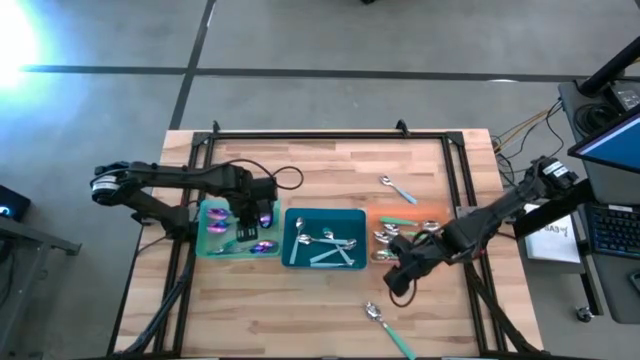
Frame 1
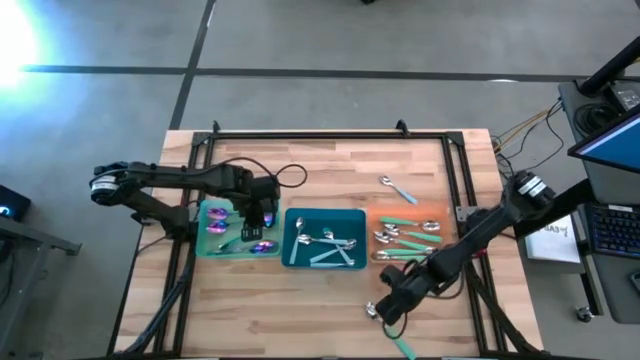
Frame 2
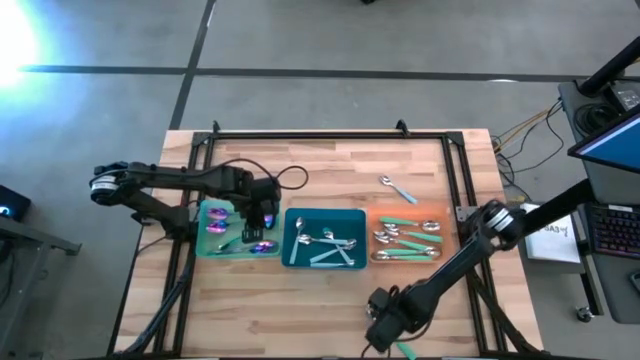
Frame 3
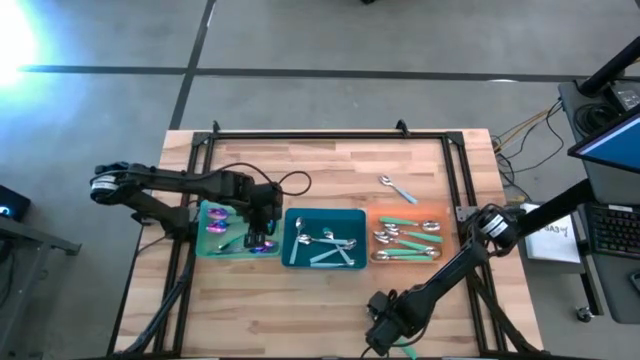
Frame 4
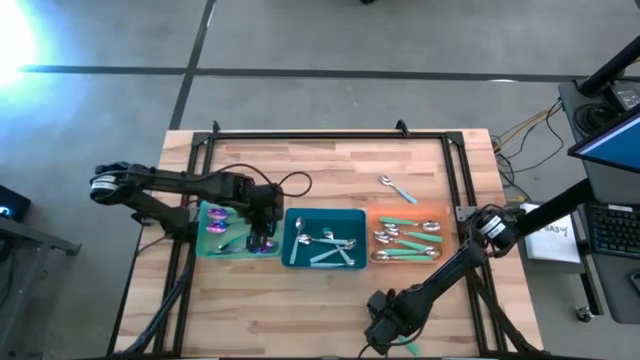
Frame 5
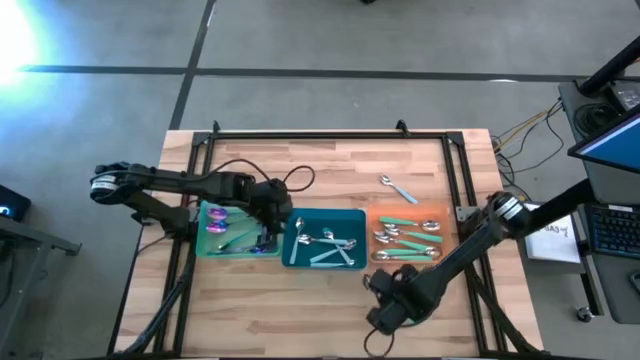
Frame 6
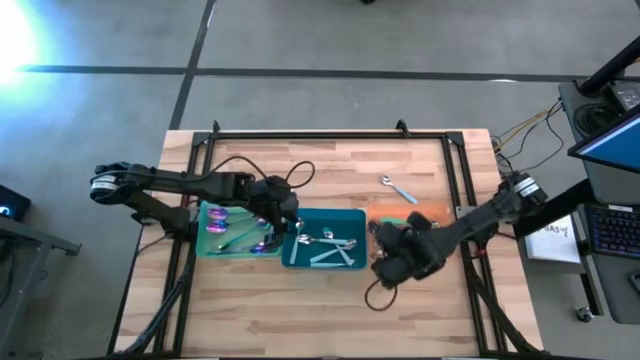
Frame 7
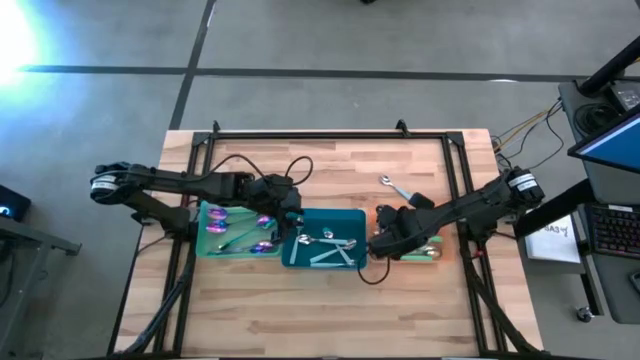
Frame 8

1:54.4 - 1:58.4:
Task: Sort silverware by color (type)
Put the green spoon into the orange bin

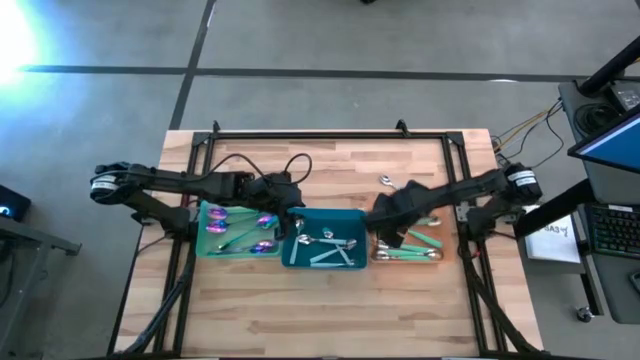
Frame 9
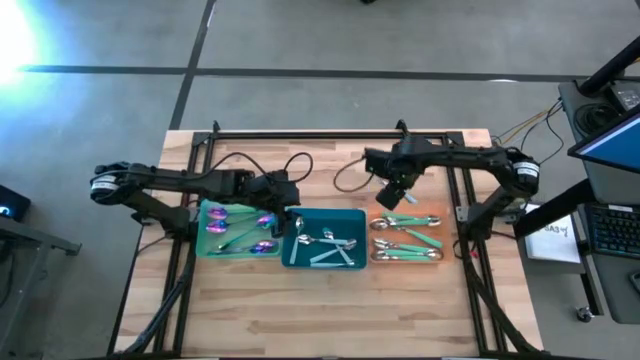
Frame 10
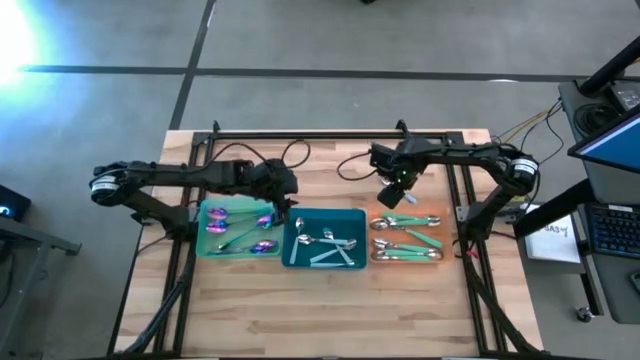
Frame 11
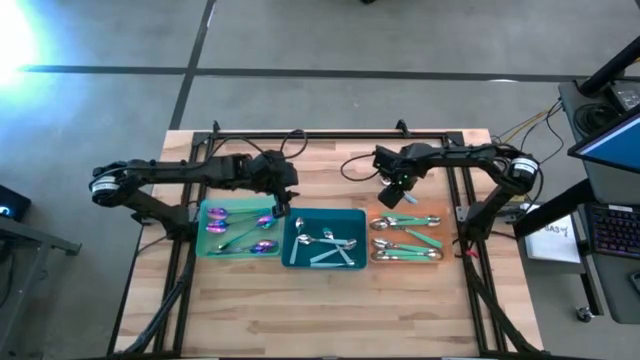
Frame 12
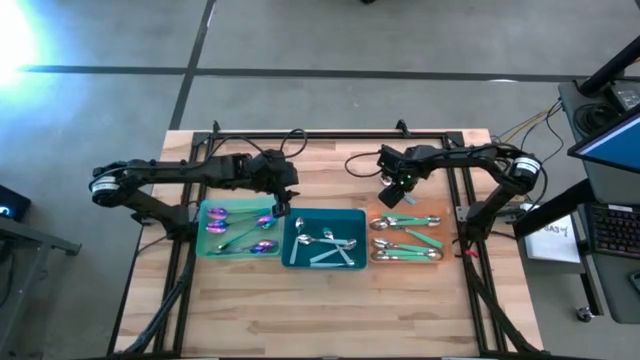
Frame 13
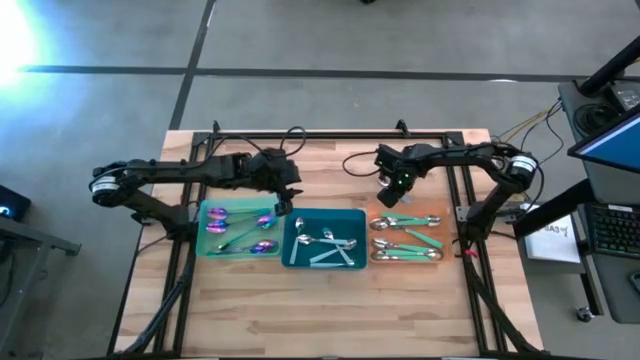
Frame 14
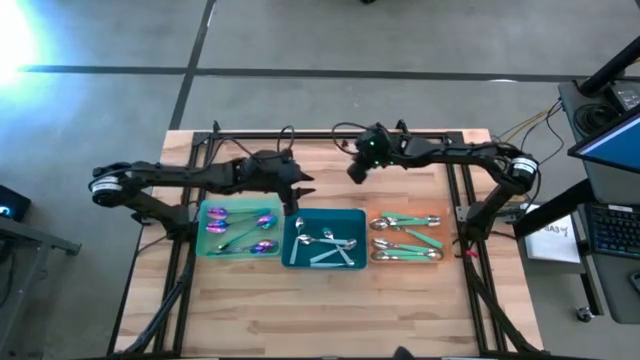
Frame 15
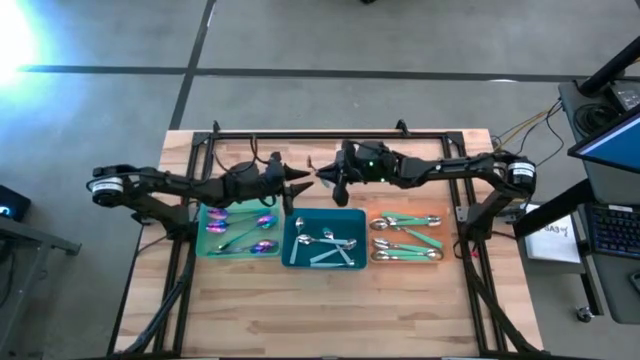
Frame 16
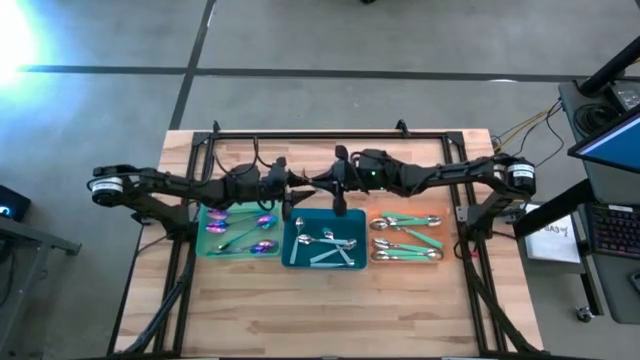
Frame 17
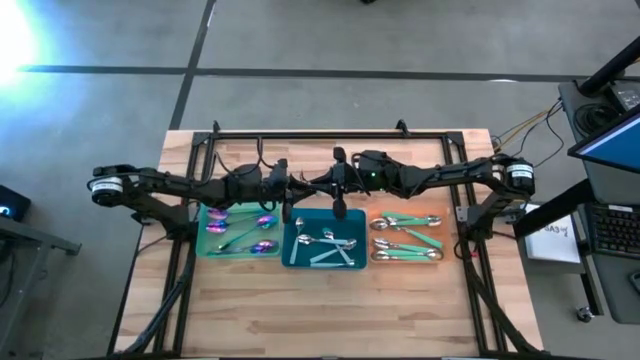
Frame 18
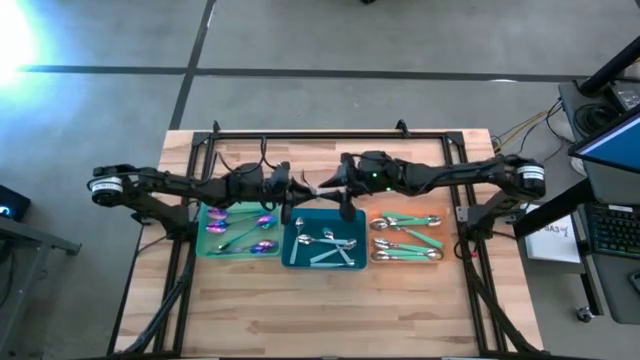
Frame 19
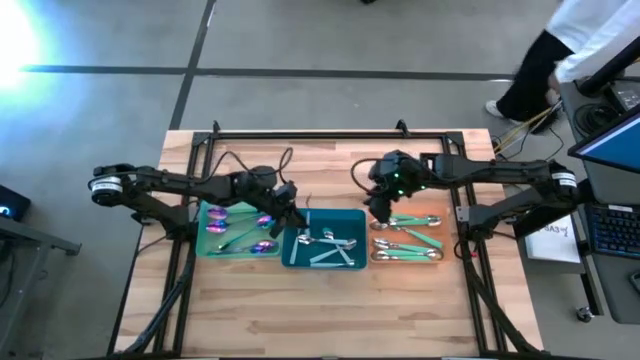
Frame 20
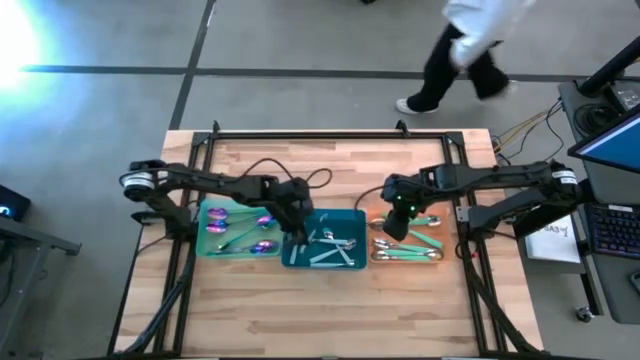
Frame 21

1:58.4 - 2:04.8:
Put the blue spoon into the blue bin

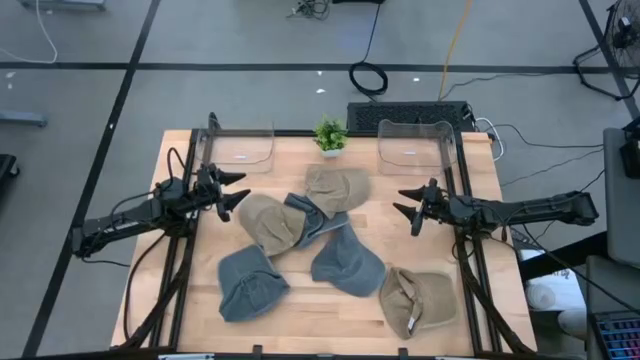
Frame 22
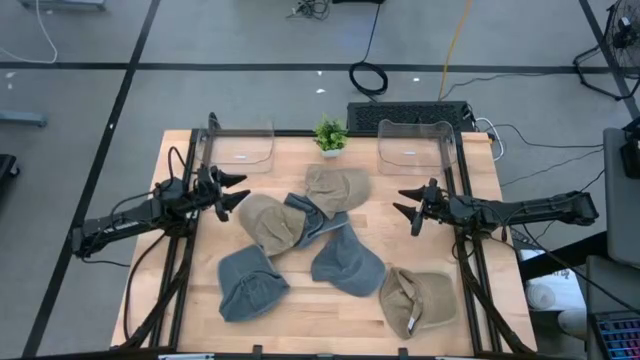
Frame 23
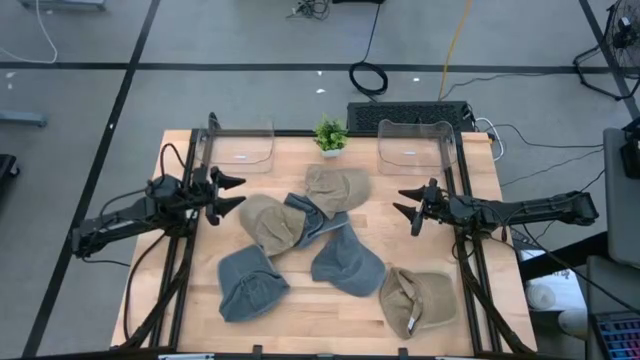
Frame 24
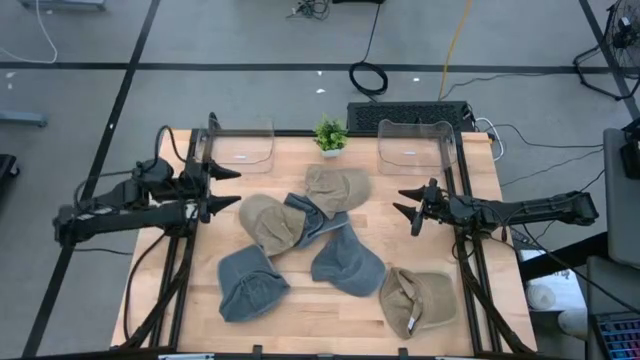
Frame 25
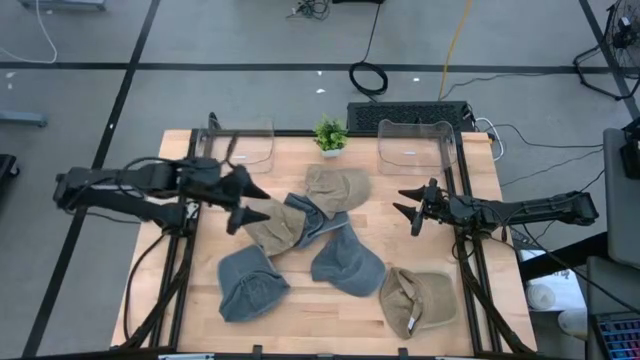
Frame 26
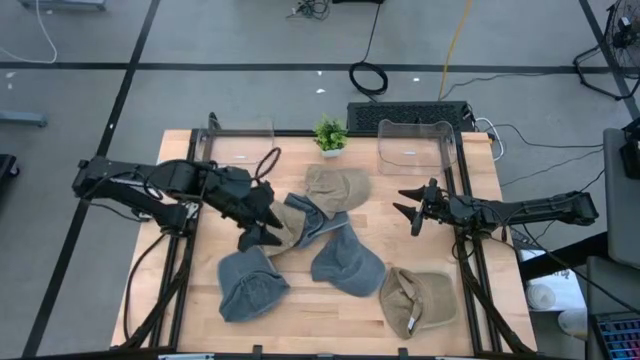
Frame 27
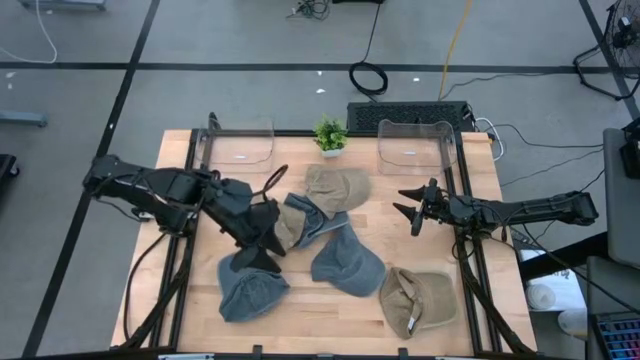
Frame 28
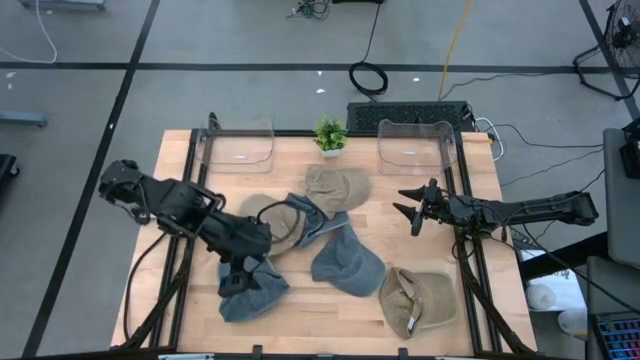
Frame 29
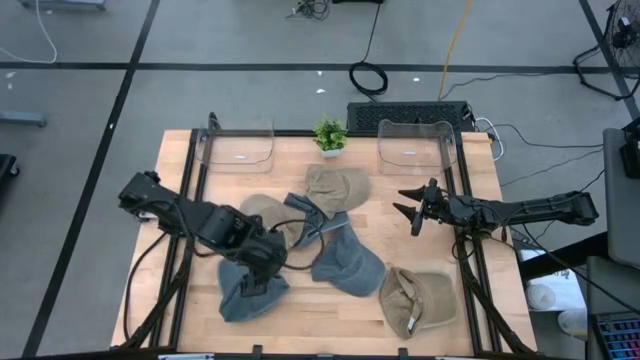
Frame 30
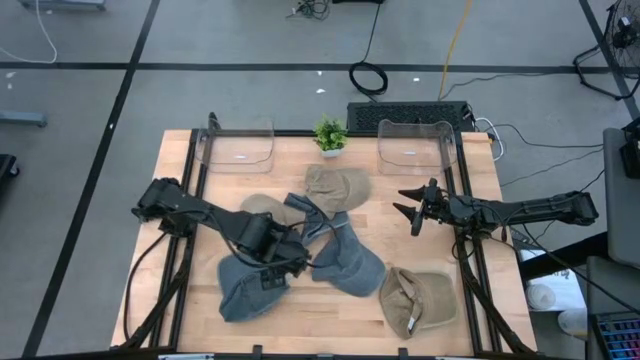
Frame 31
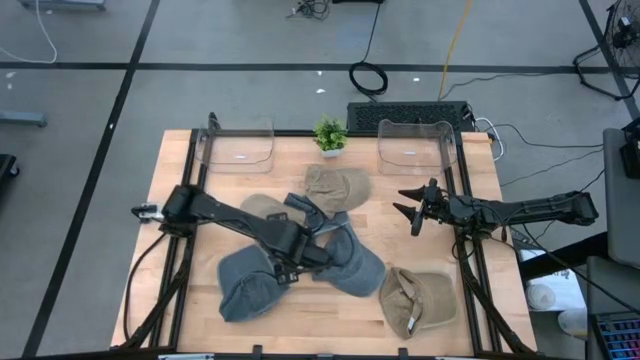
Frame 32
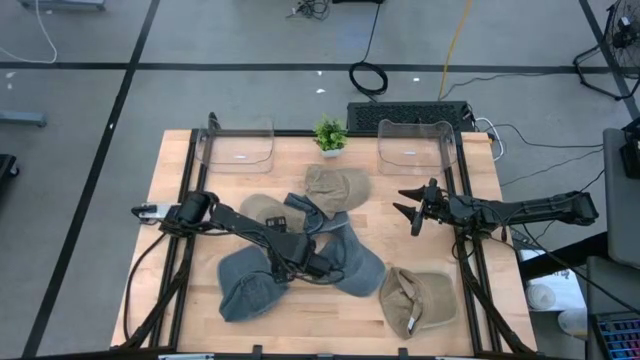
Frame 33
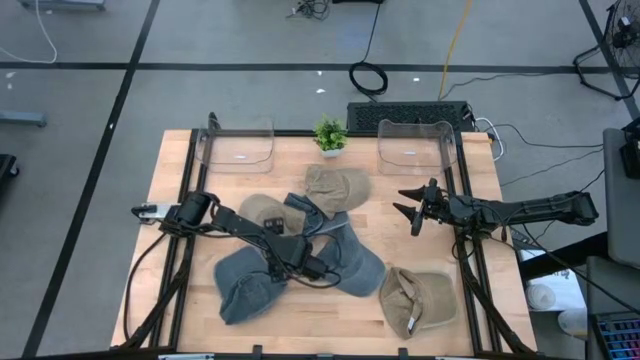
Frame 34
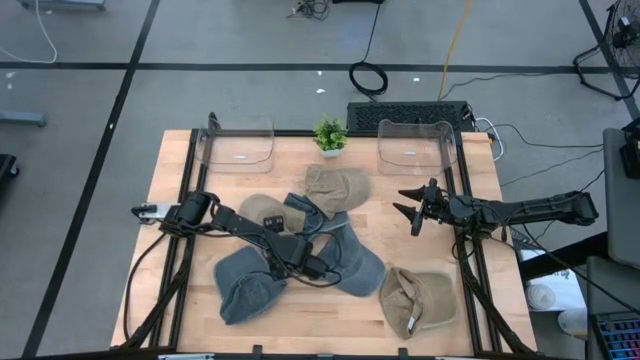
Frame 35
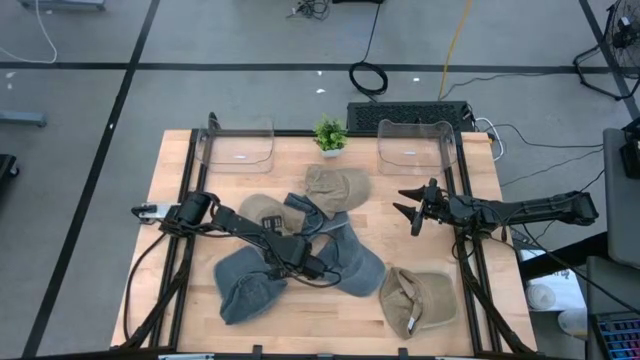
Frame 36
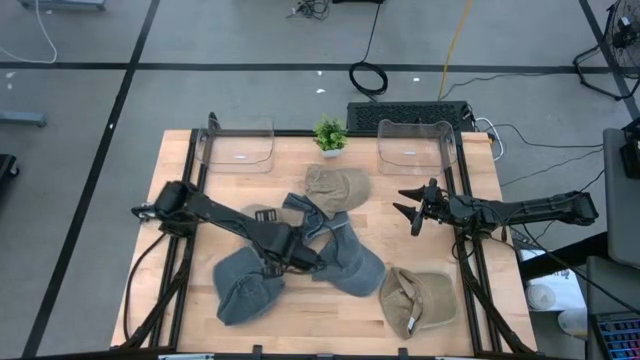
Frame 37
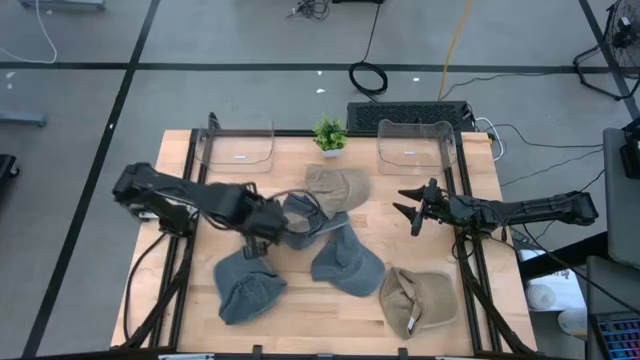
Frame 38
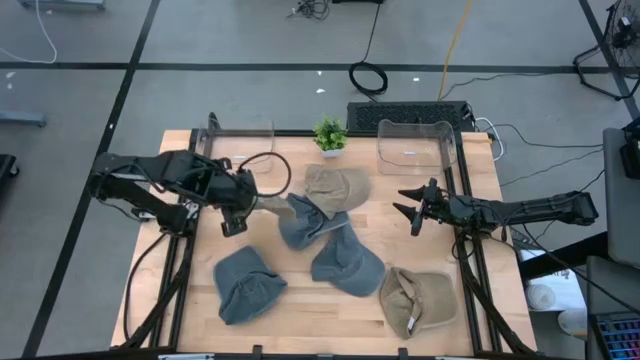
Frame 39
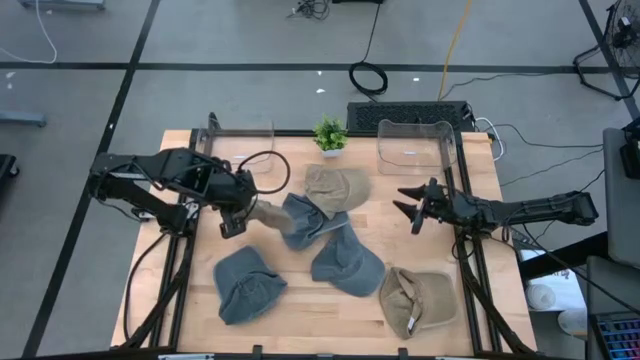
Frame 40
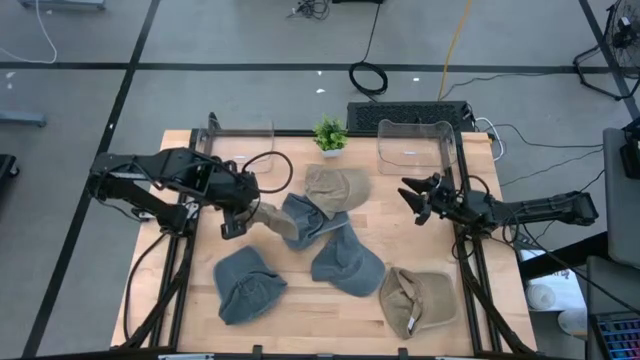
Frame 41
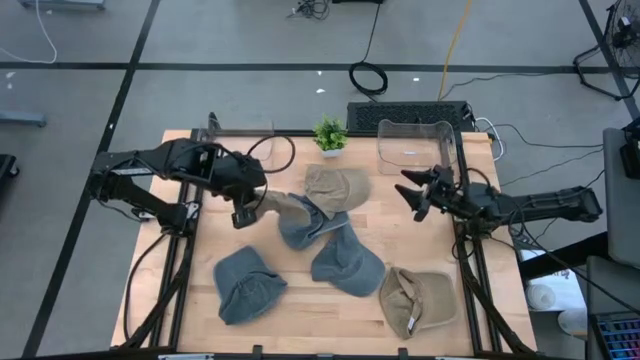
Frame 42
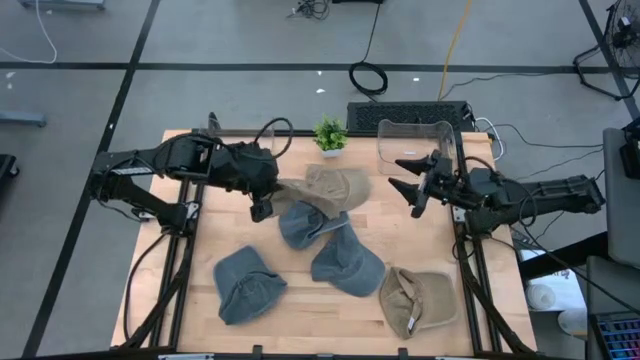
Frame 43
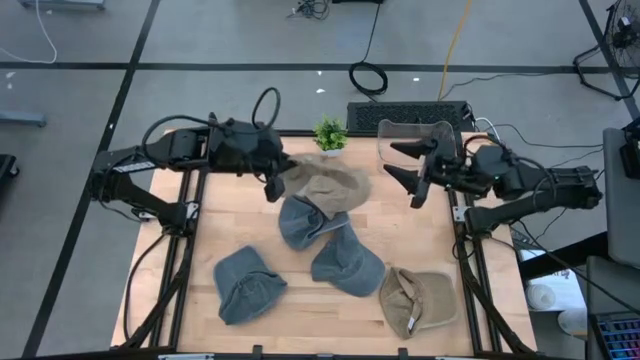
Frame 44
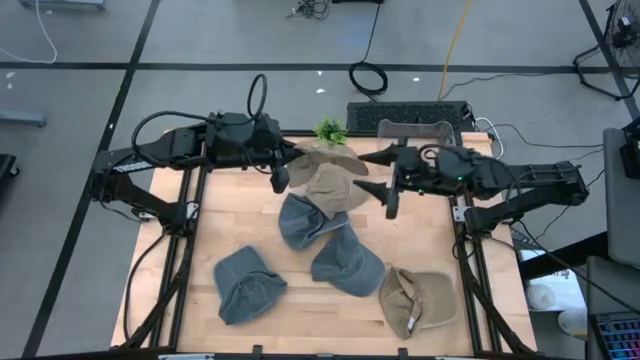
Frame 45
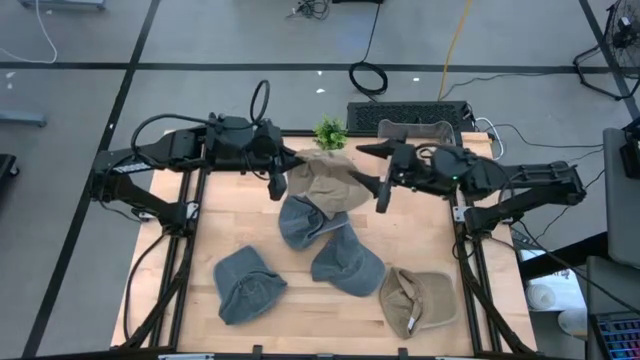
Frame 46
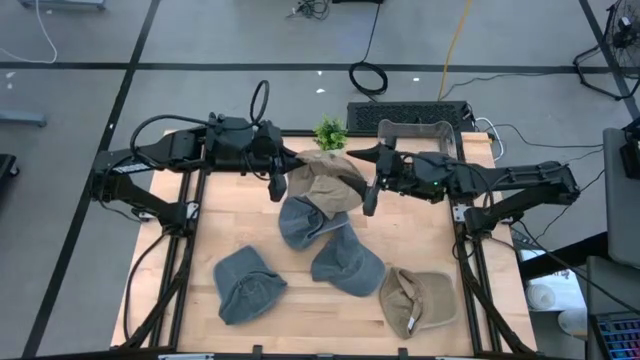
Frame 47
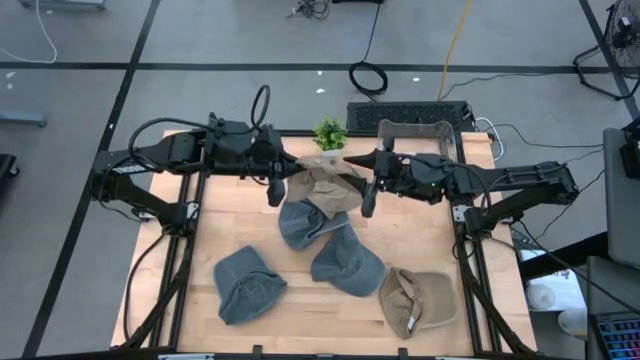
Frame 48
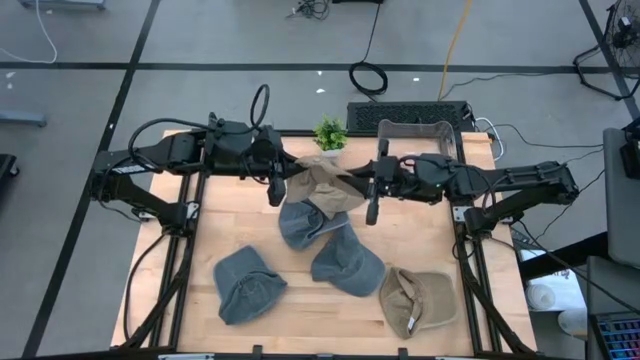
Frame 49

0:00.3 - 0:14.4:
Task: Pick & Place hat
Put the top left brown cap into the right transparent bin
